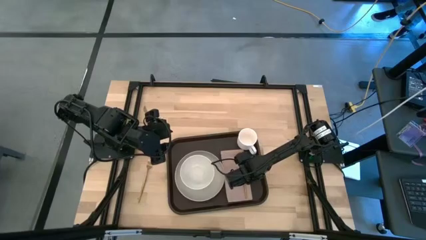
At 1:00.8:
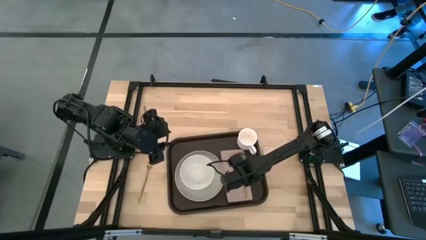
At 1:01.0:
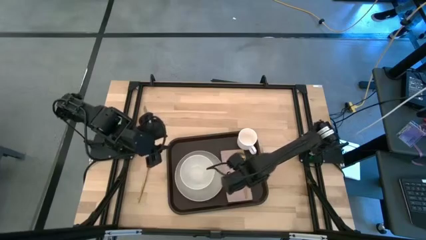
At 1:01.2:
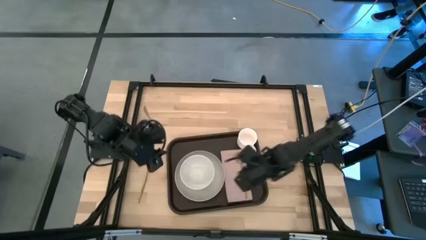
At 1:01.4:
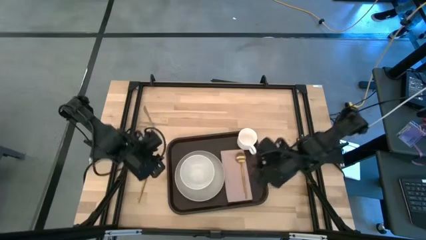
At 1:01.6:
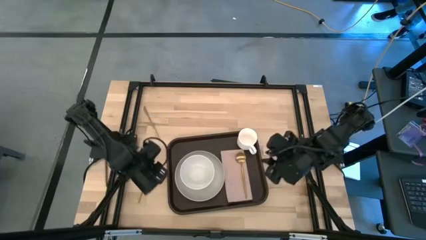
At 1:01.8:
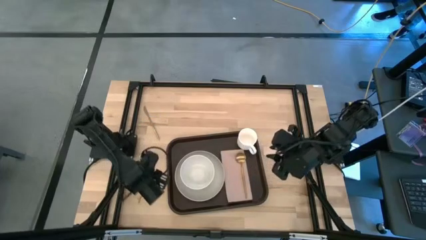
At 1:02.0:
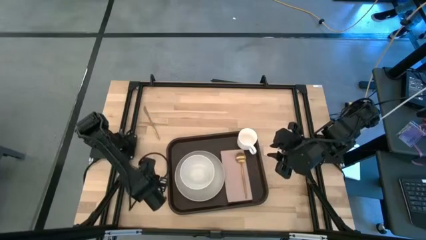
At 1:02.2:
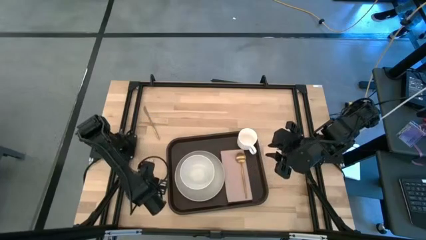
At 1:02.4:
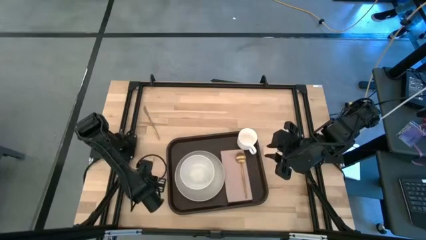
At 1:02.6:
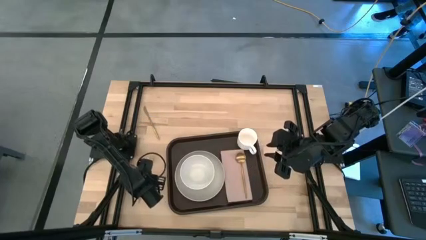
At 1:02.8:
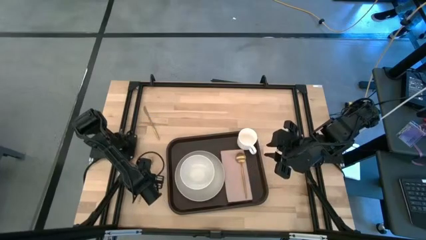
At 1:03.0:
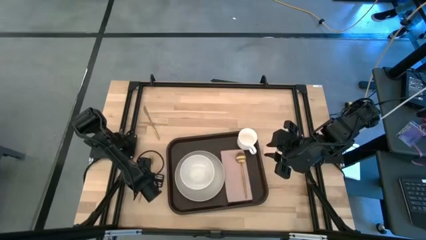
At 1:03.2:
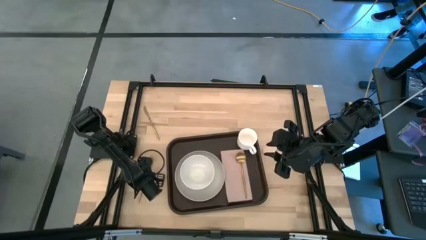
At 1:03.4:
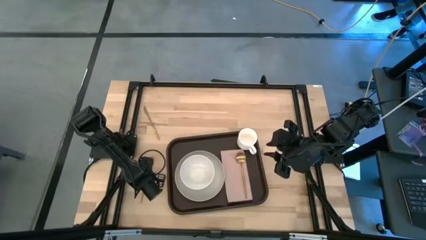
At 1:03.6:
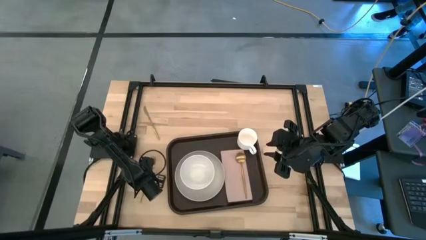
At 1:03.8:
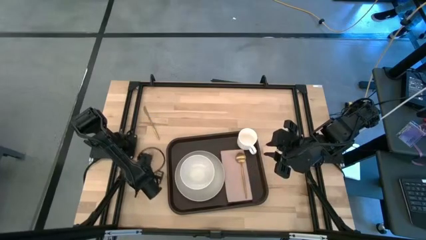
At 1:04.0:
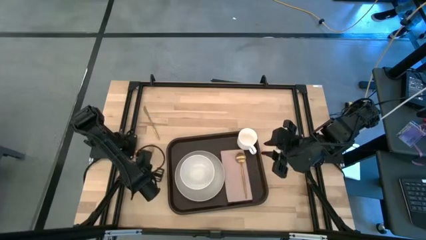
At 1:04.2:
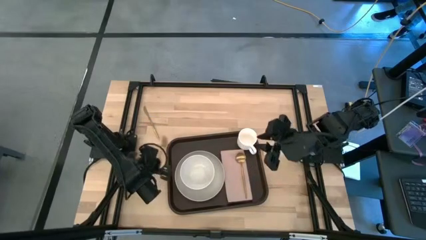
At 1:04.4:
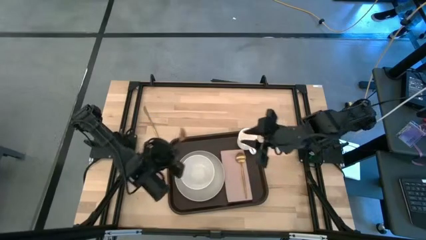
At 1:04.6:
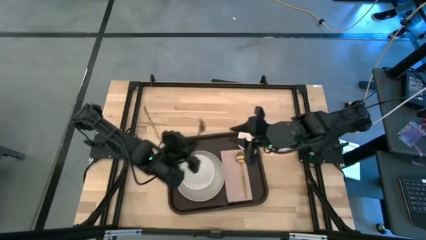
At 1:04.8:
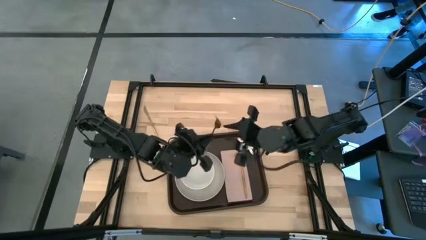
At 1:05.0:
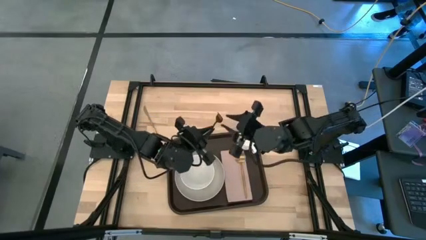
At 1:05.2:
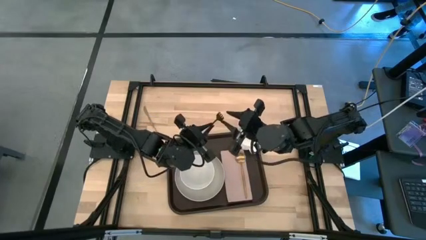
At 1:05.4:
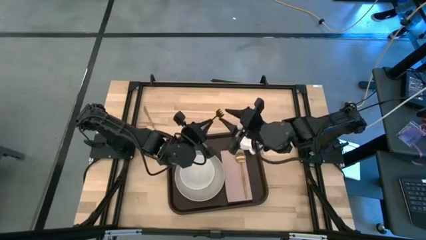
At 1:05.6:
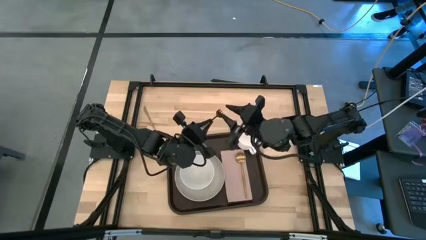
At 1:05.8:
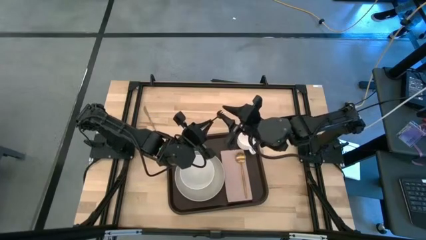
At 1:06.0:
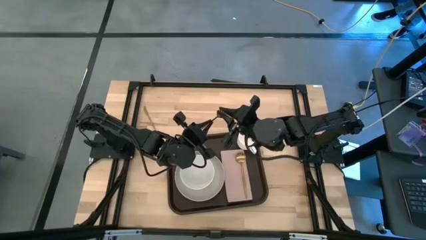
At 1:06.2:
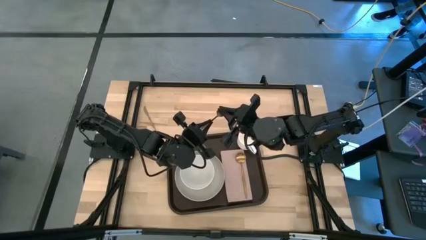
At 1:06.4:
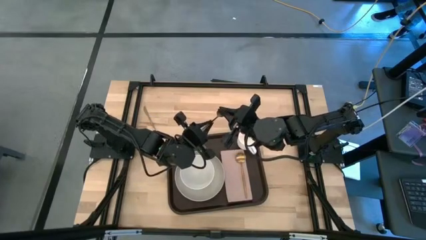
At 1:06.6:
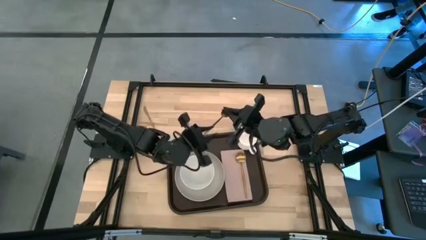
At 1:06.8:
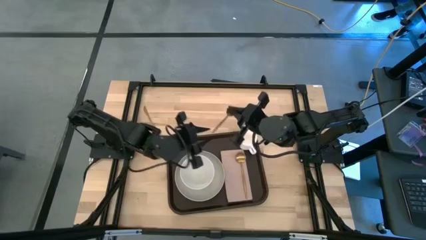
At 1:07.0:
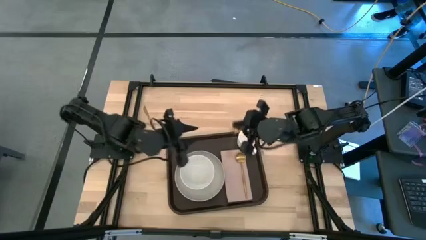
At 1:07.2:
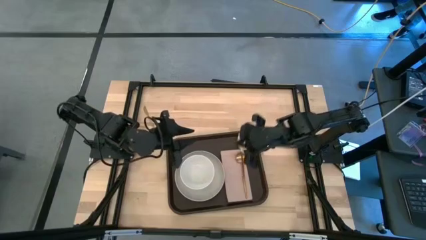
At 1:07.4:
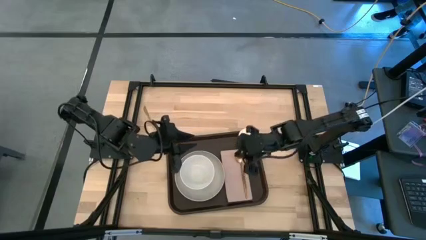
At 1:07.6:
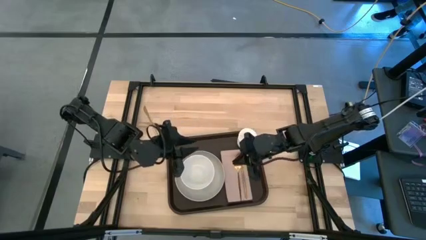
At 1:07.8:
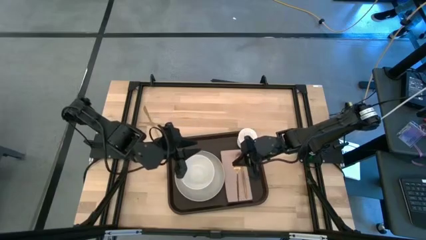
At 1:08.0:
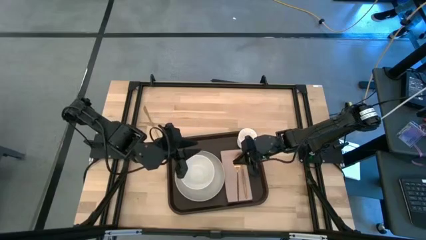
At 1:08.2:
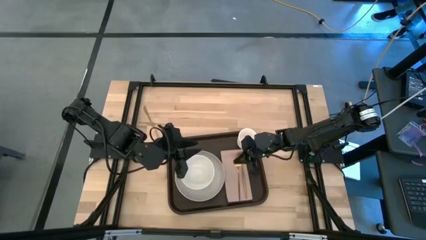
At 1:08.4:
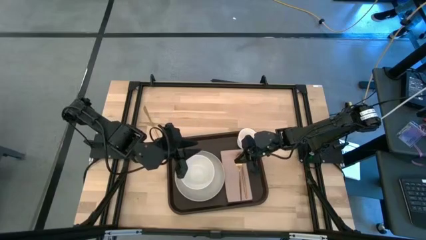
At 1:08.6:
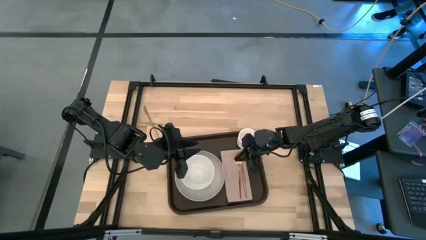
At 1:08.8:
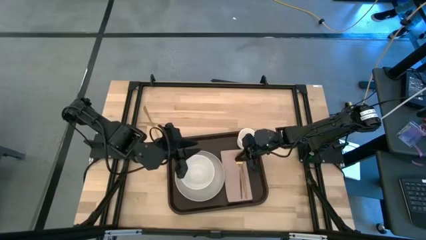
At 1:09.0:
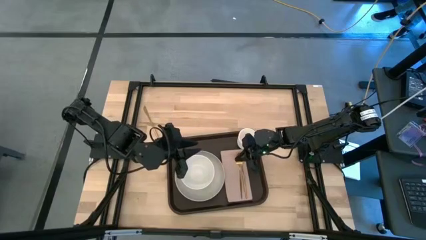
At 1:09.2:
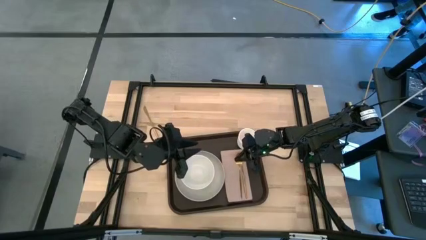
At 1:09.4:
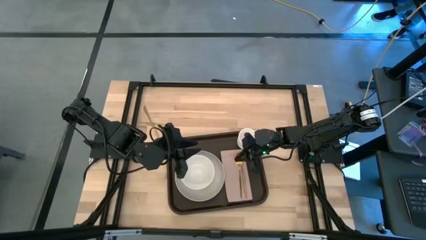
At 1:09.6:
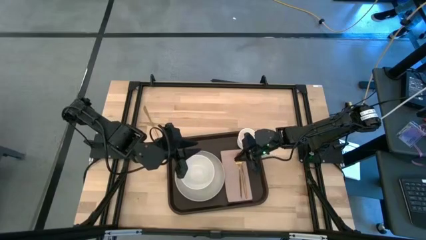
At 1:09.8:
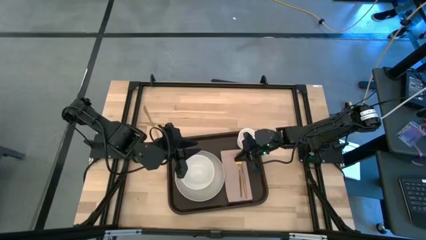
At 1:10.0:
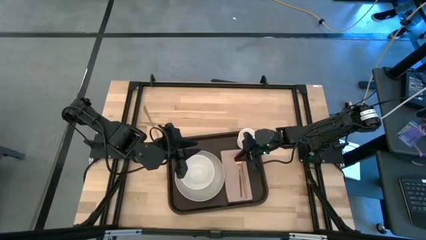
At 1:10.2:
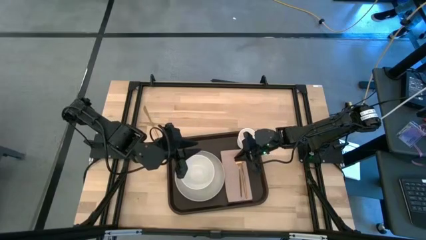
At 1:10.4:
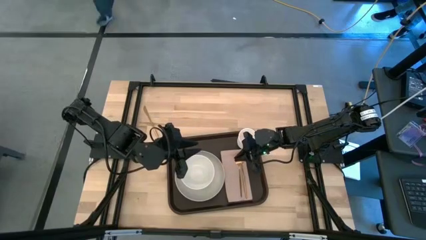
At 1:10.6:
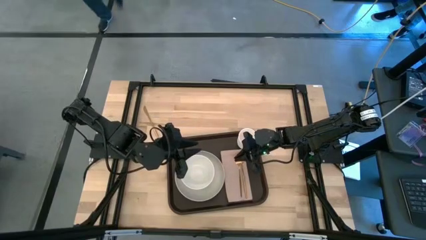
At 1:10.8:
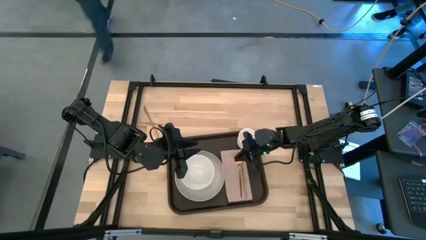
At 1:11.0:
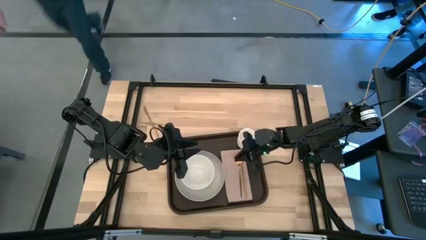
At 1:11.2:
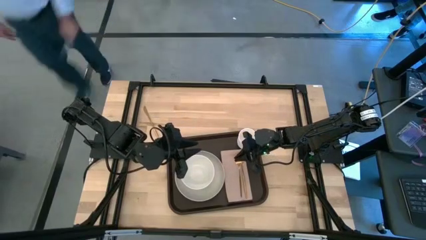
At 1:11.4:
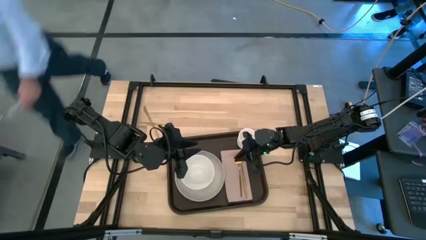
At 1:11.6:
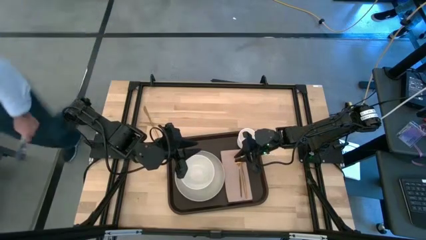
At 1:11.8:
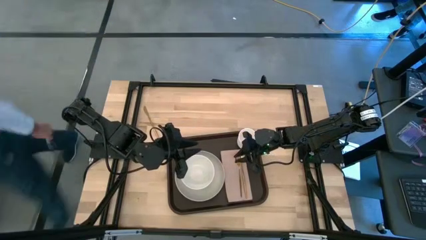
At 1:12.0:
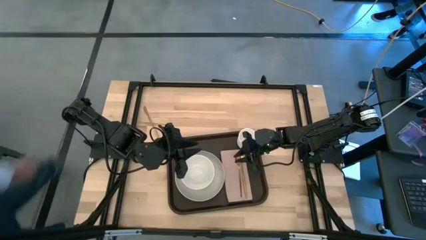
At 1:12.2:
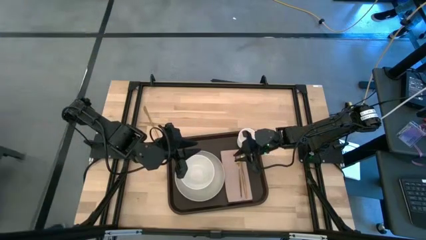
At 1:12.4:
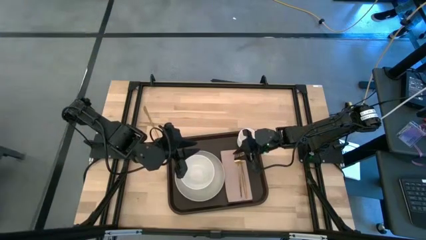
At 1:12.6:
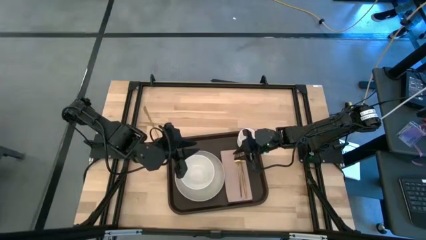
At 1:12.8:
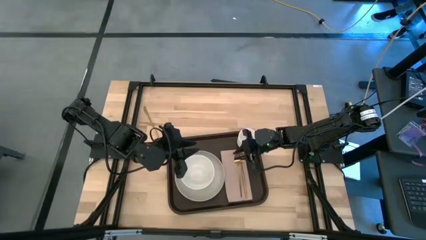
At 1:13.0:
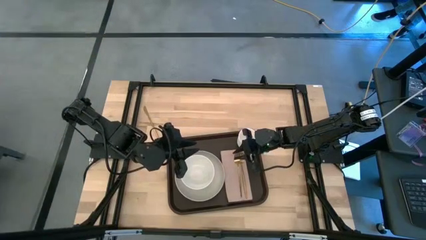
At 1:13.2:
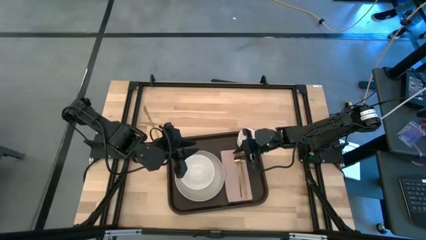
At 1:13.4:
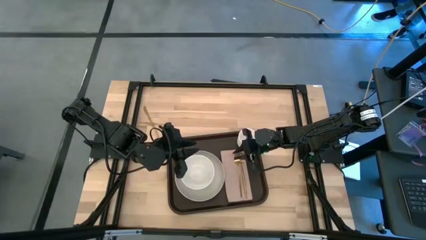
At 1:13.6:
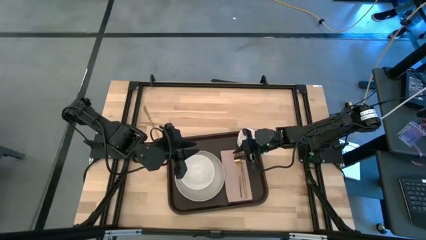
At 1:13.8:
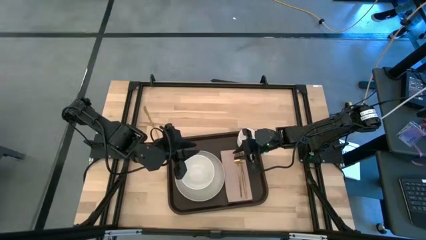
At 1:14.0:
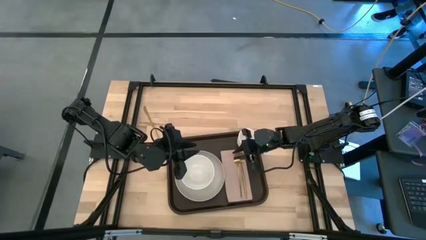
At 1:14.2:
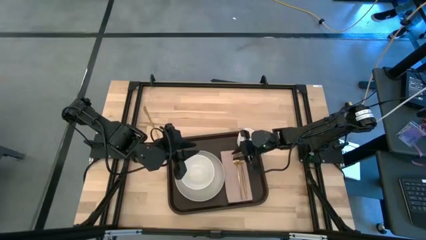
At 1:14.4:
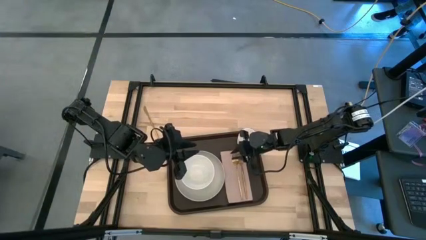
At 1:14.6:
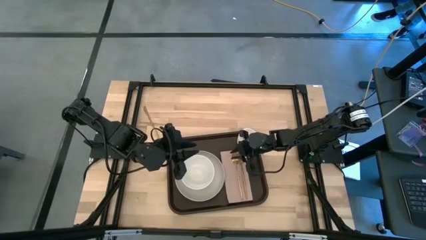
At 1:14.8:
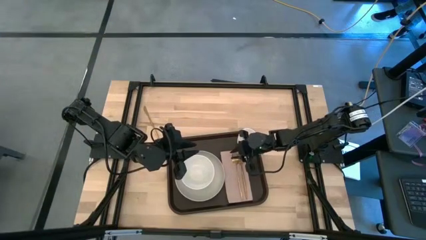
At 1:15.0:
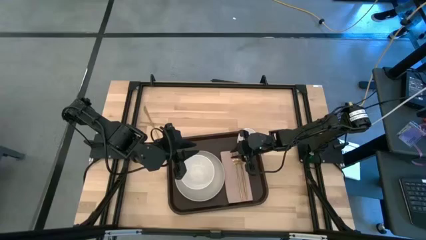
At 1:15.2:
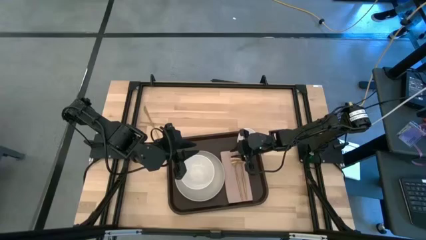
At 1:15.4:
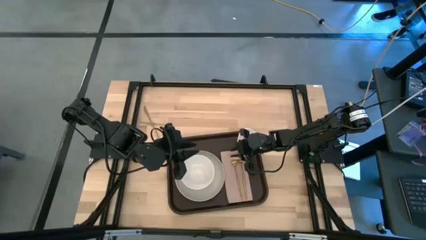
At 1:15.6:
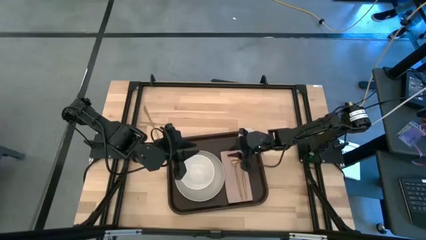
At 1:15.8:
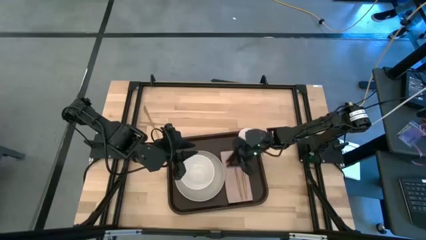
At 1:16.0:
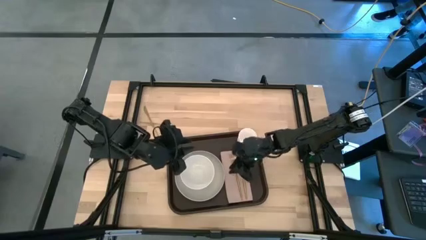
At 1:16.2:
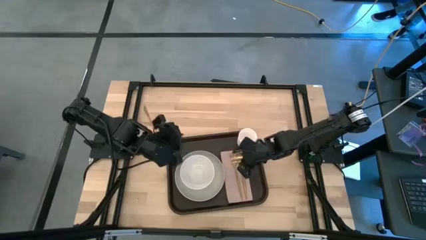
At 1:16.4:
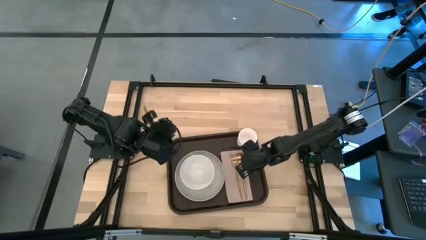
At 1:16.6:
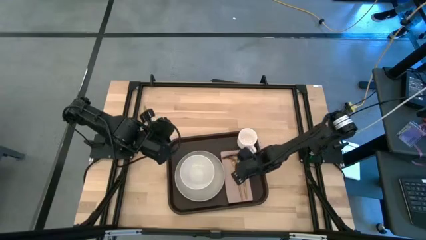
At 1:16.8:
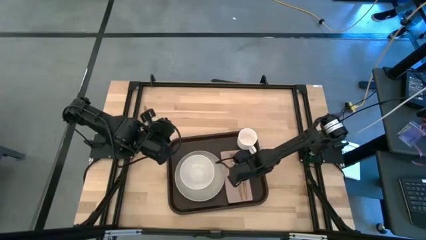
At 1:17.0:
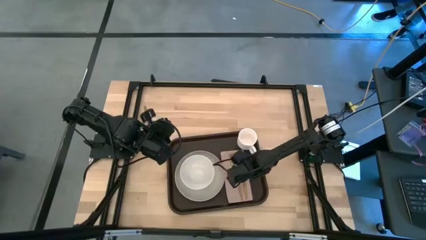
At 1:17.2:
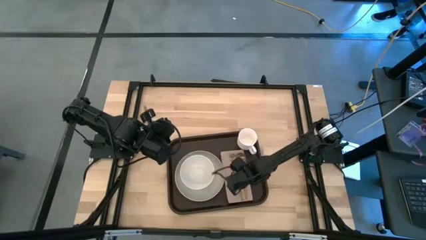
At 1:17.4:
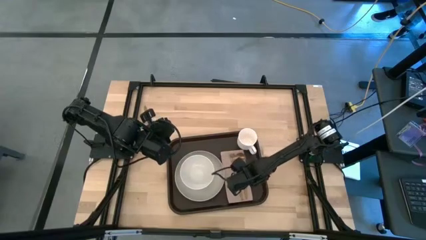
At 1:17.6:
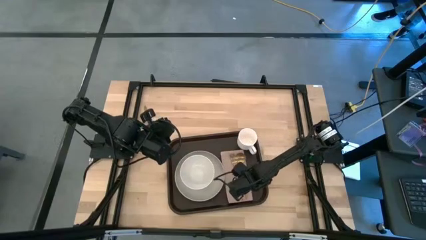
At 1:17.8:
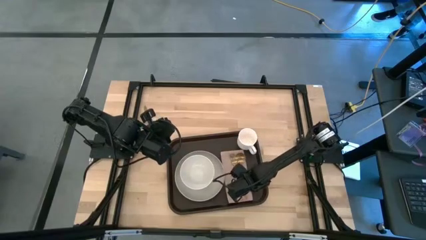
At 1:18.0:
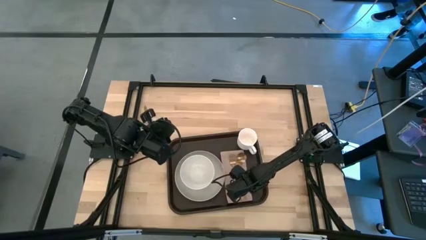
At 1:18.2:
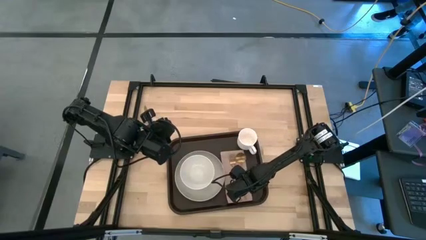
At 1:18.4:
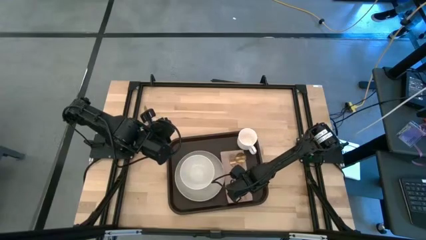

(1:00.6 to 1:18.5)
Task: Set up tray
Put the golden fork to the right of the golden spoon on the brown serving tray
